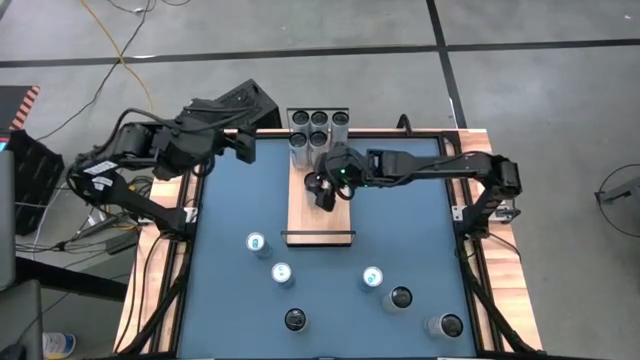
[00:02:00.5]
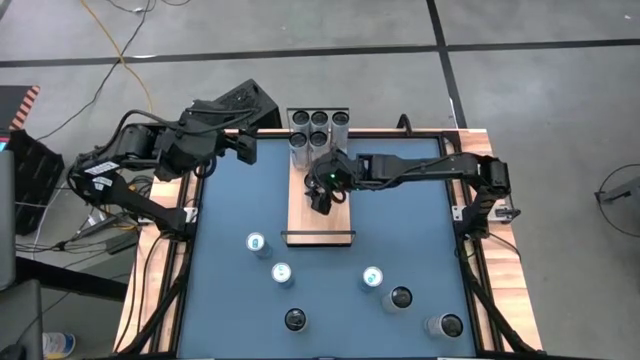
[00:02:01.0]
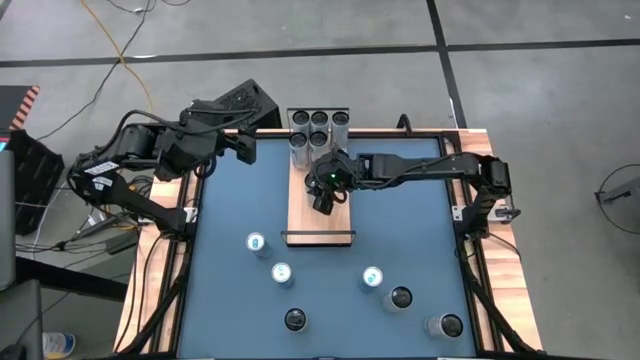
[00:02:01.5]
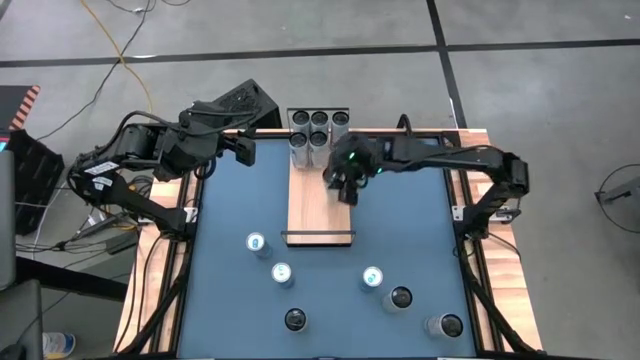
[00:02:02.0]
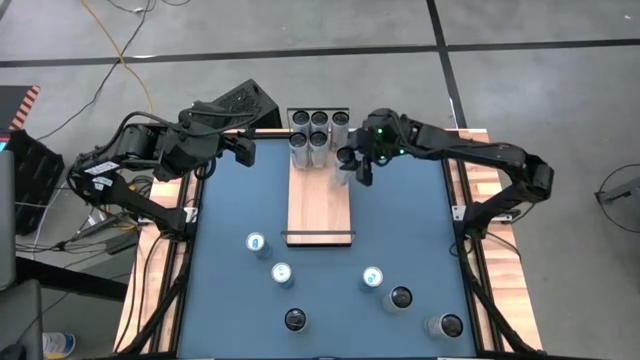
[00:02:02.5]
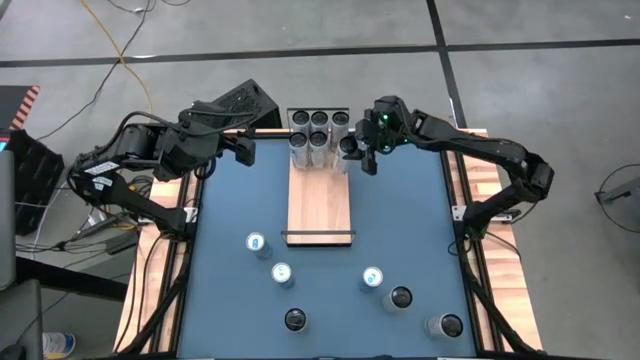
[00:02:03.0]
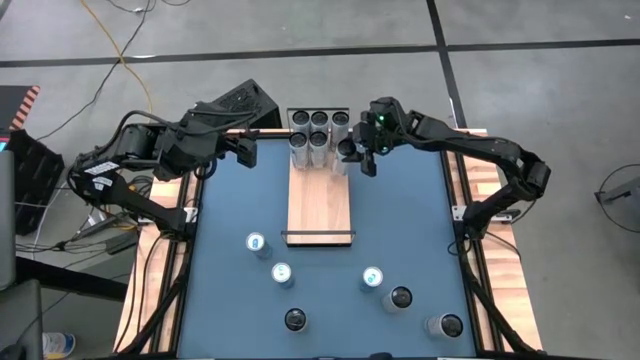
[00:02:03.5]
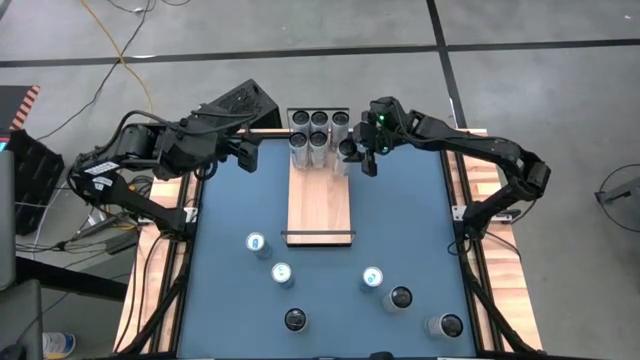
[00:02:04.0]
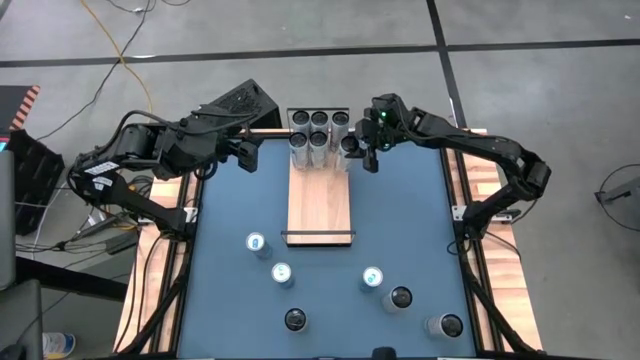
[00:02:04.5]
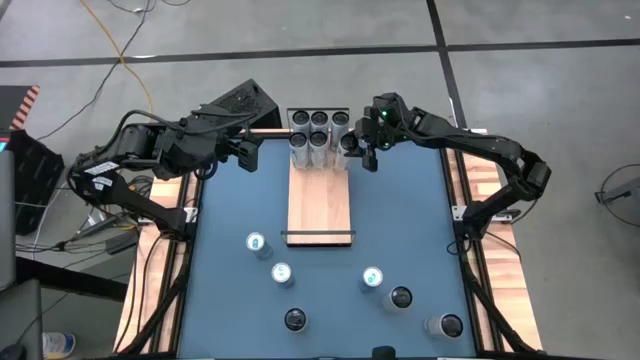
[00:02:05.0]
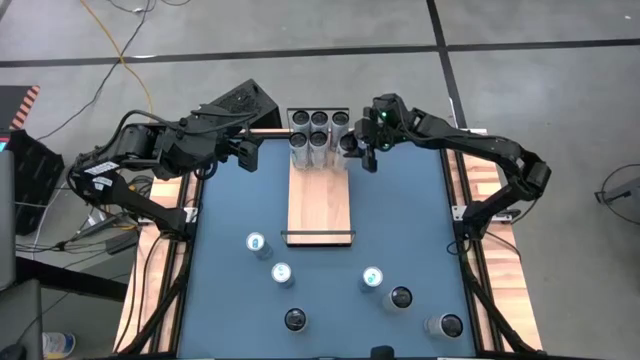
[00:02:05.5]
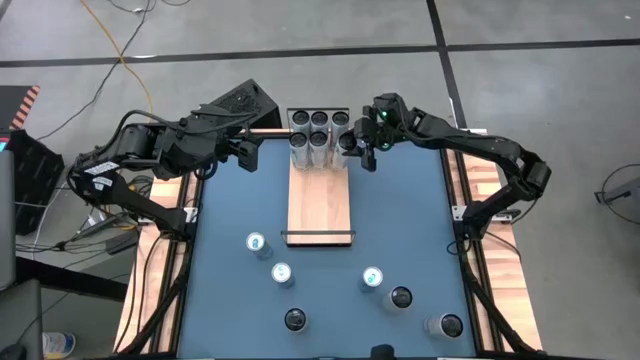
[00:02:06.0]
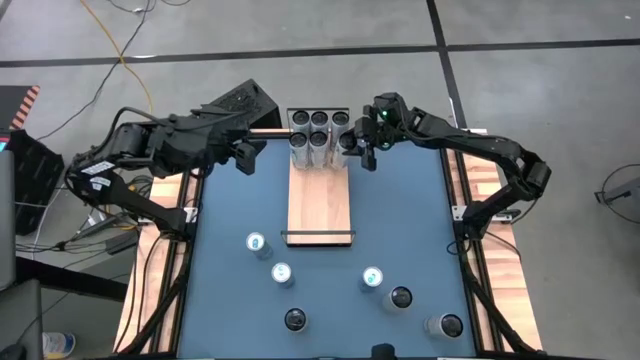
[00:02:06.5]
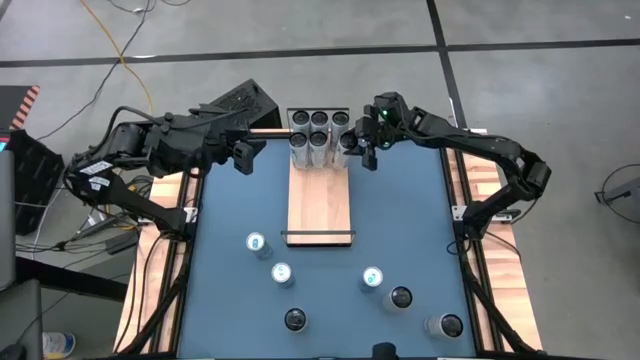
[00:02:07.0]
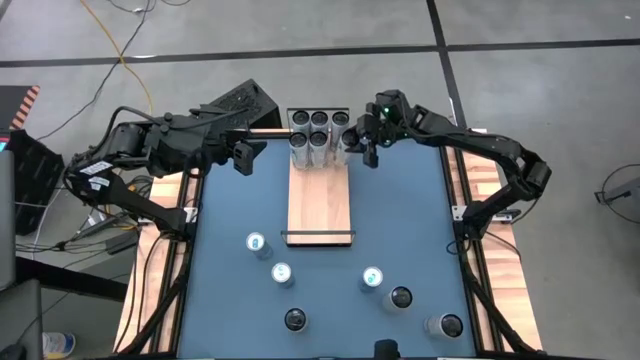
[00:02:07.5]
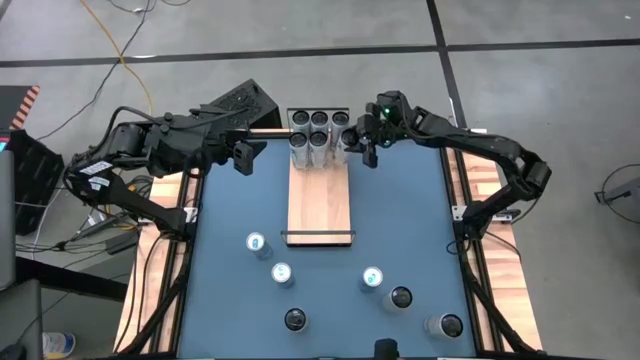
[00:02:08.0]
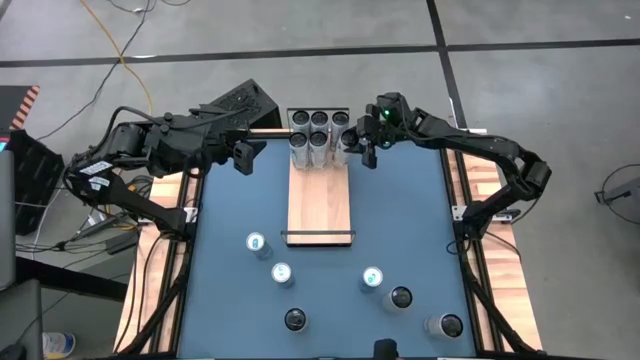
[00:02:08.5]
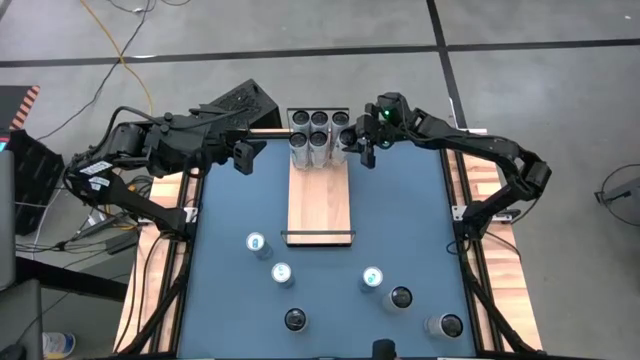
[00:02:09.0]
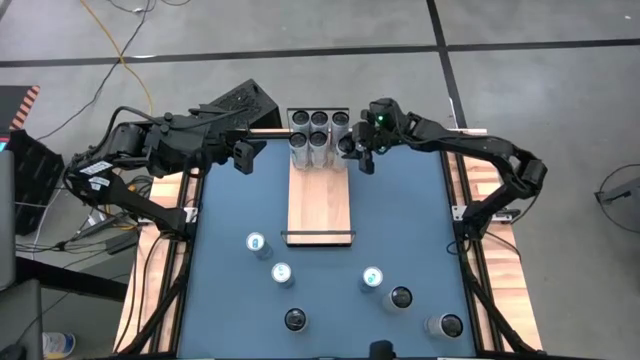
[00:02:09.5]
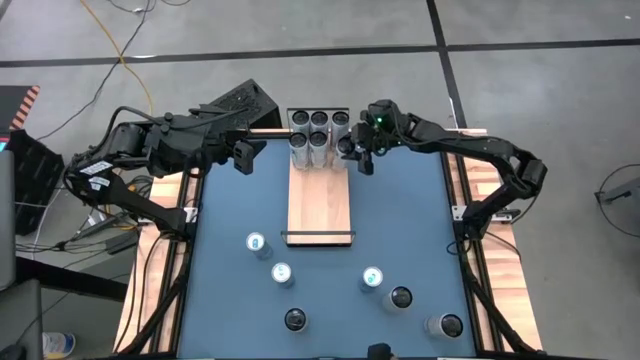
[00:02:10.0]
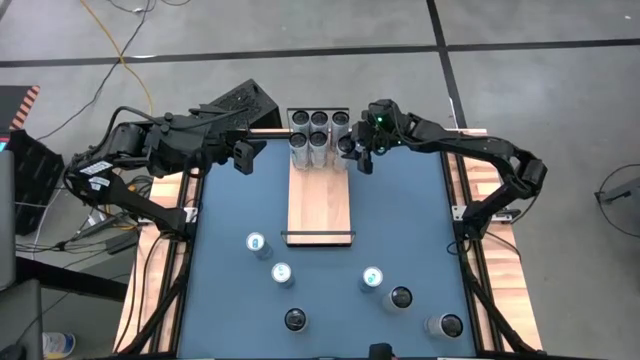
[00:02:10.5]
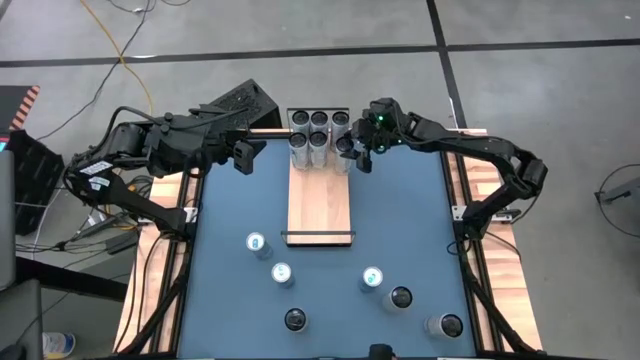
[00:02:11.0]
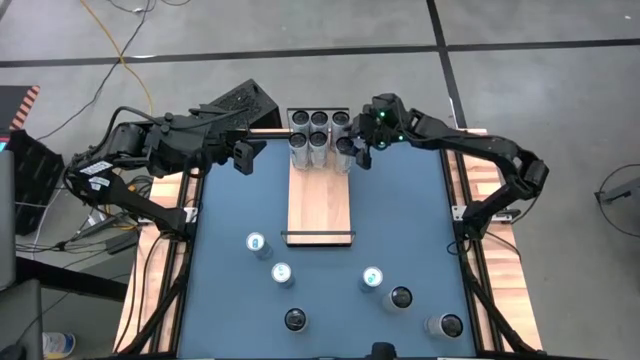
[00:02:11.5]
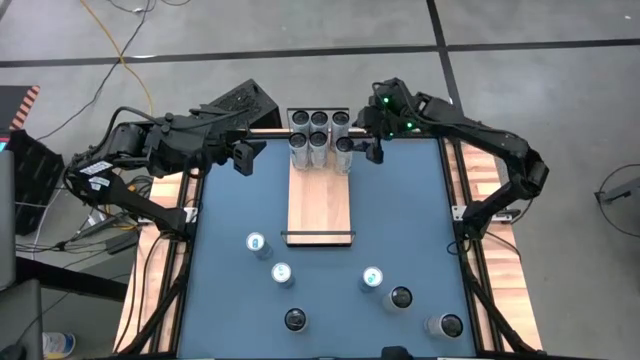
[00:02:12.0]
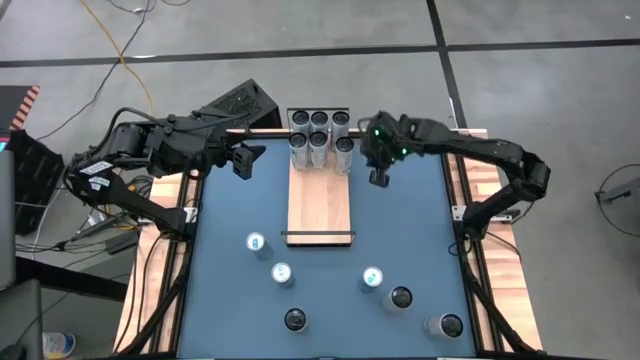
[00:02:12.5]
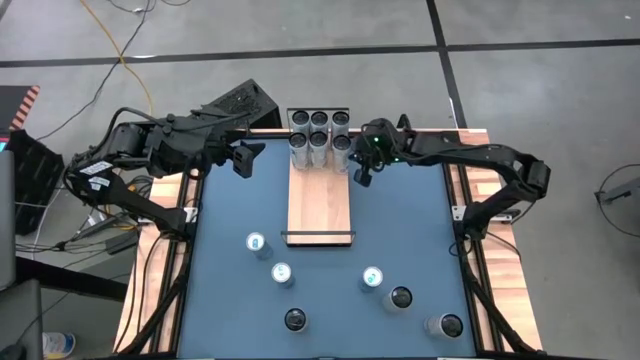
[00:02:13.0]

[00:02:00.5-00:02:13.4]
Task: Place canned beverage on shelf
Put the white-pink black soda can on the shelf

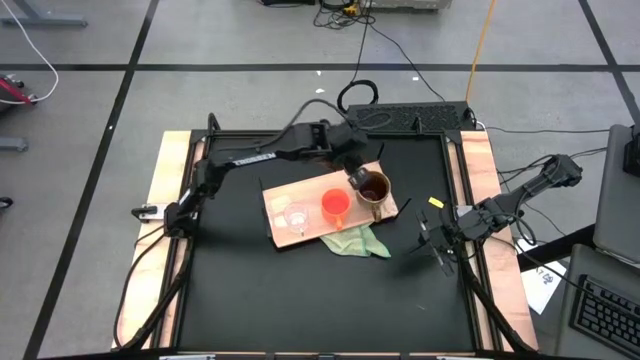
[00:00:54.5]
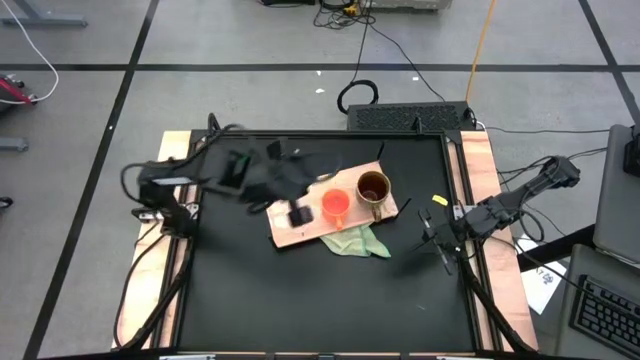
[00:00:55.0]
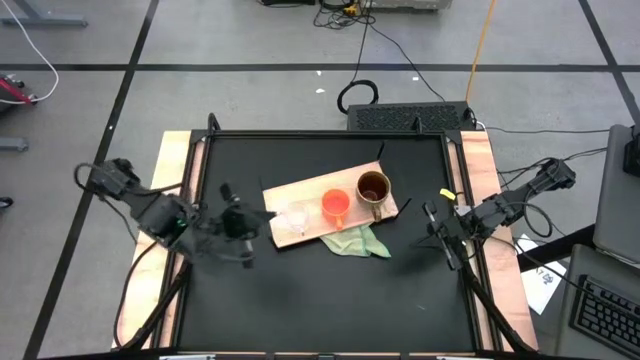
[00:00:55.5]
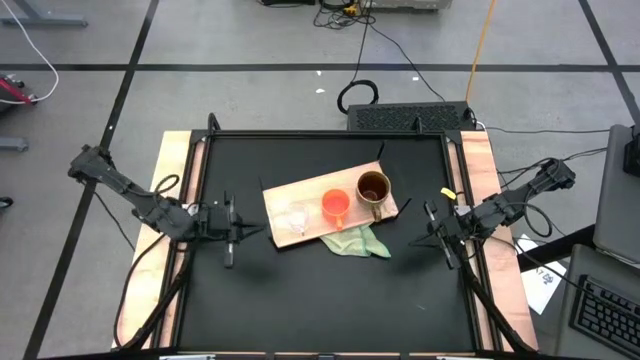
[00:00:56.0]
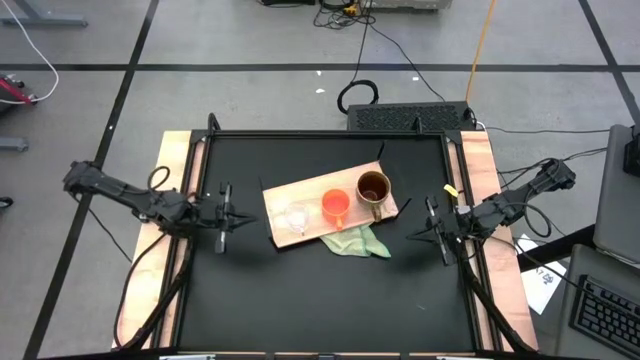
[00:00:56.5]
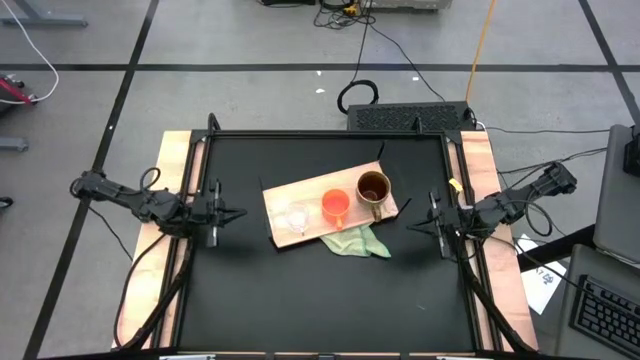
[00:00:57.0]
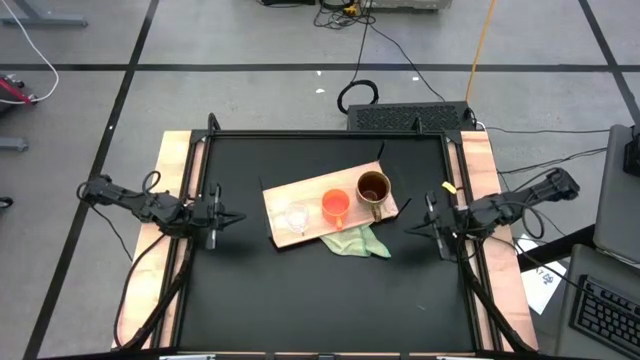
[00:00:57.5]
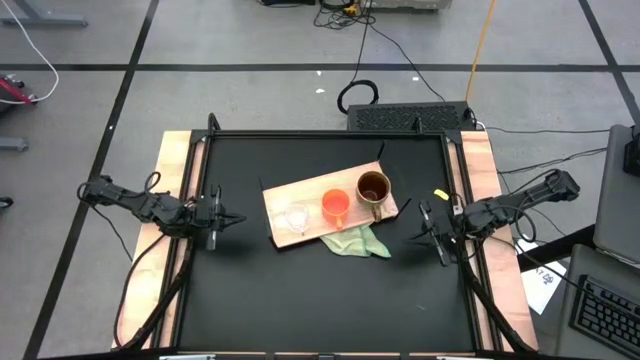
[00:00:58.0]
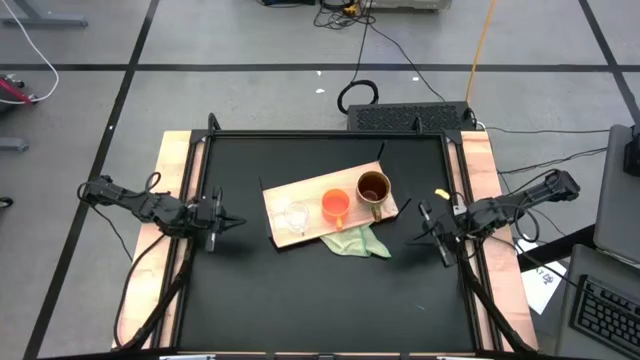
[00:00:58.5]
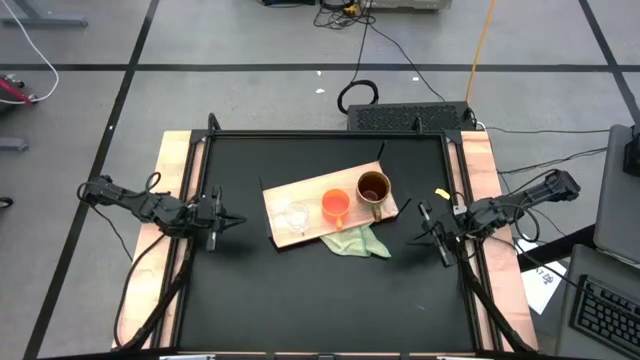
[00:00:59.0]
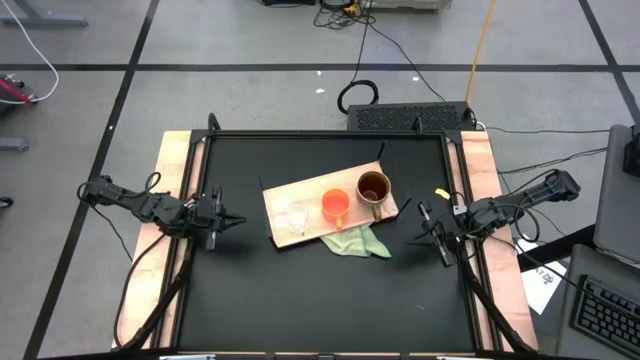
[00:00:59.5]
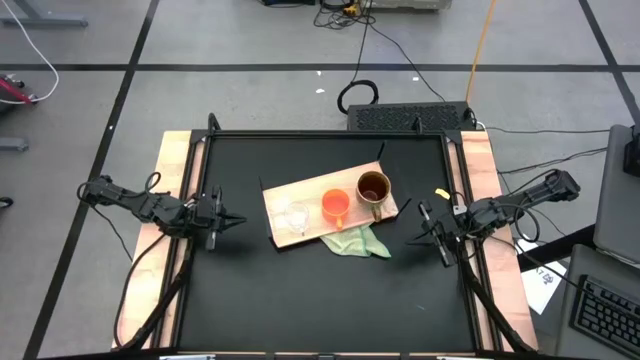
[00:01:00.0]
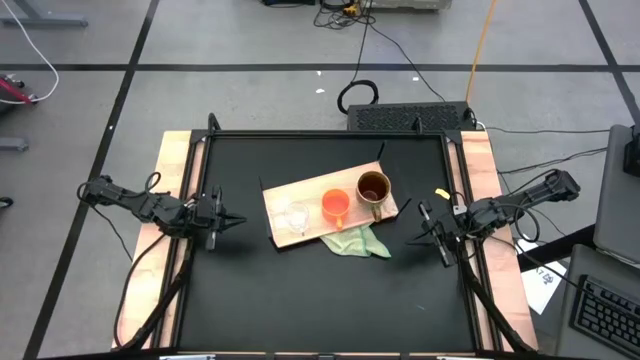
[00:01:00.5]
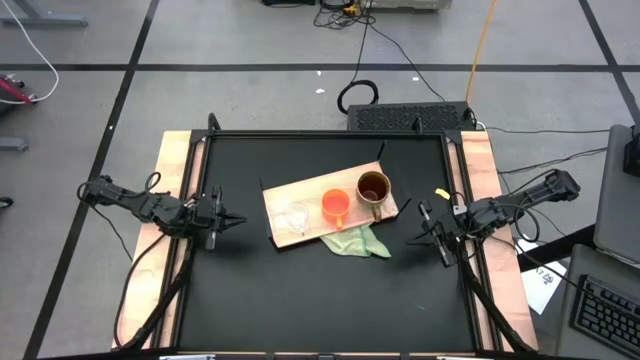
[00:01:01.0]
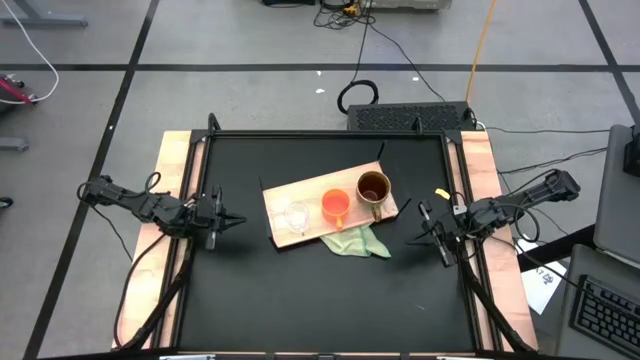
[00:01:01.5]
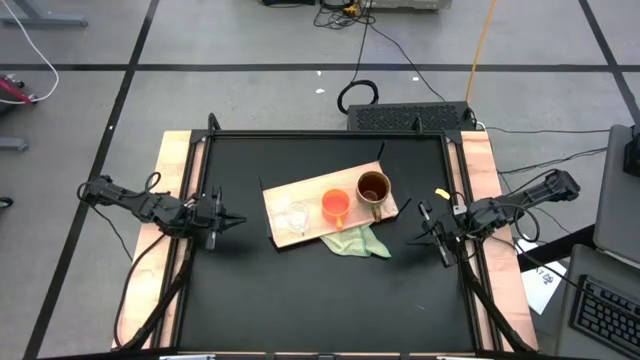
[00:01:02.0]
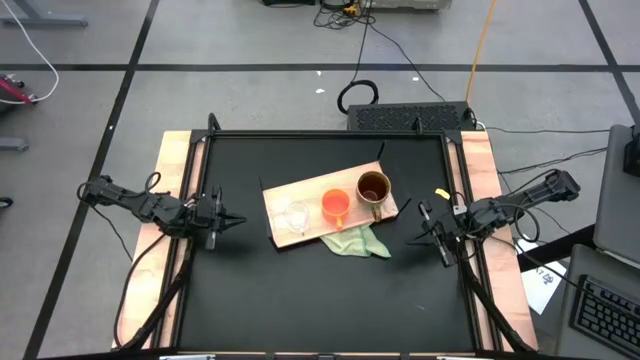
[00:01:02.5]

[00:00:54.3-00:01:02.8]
Task: Stack small to large cups/mugs on shelf
Return to Home Position
